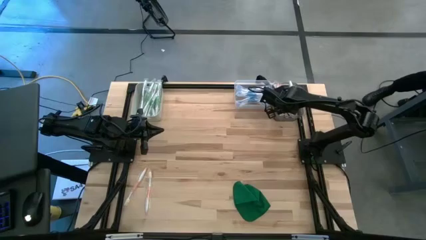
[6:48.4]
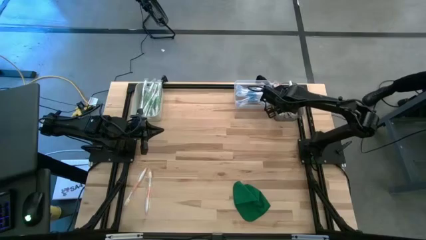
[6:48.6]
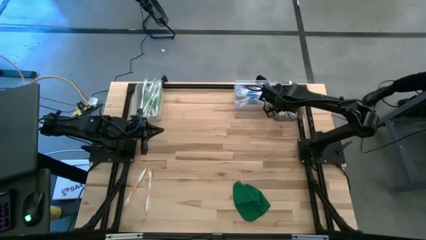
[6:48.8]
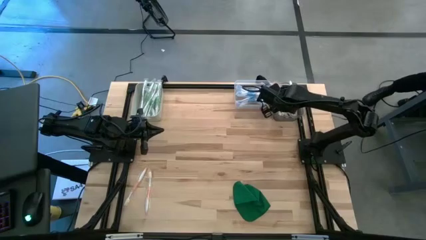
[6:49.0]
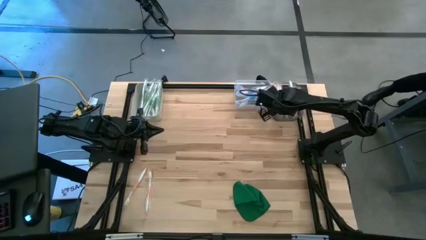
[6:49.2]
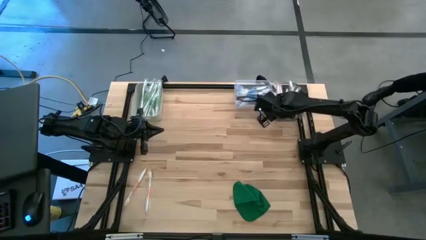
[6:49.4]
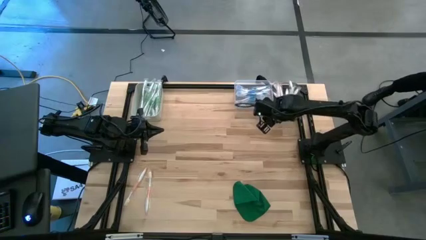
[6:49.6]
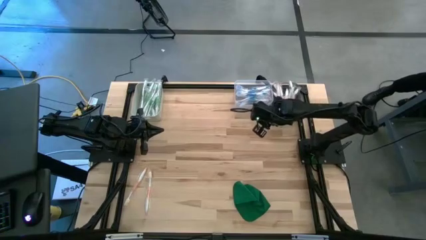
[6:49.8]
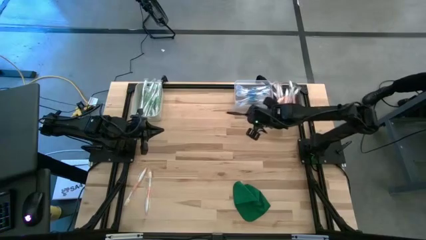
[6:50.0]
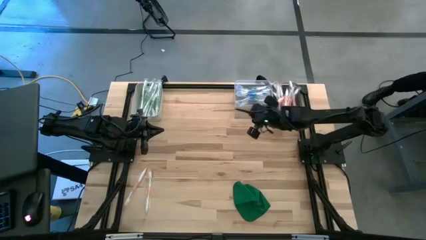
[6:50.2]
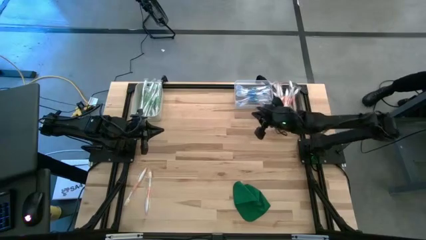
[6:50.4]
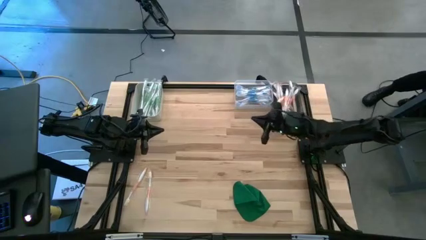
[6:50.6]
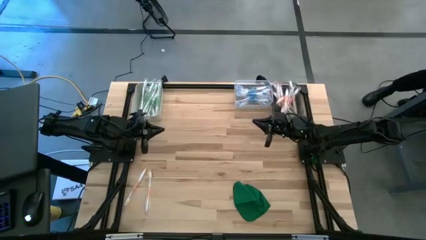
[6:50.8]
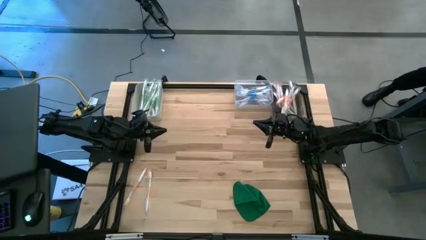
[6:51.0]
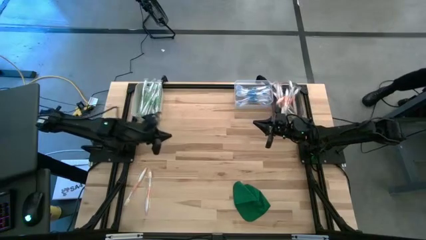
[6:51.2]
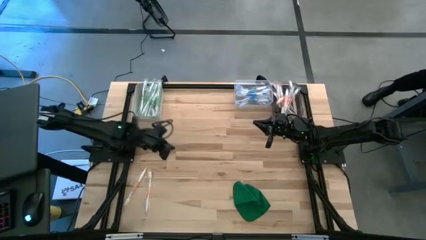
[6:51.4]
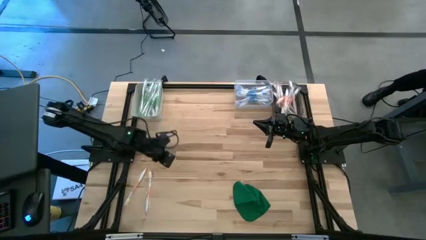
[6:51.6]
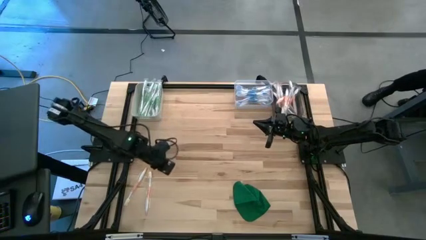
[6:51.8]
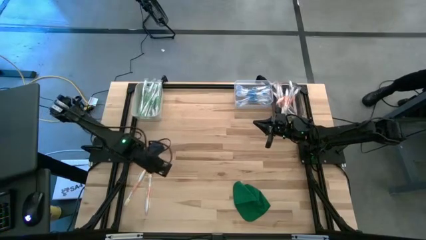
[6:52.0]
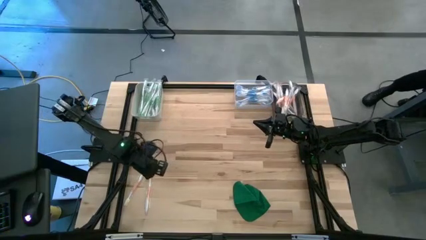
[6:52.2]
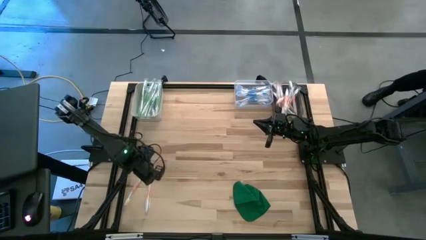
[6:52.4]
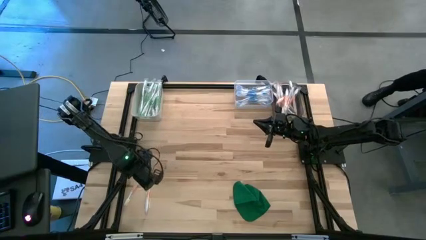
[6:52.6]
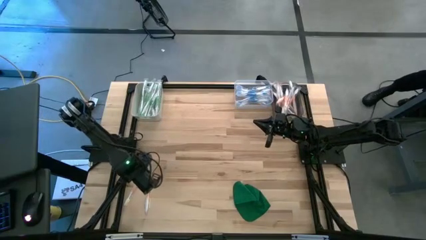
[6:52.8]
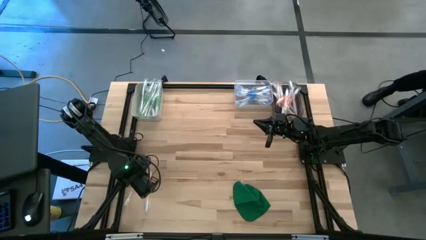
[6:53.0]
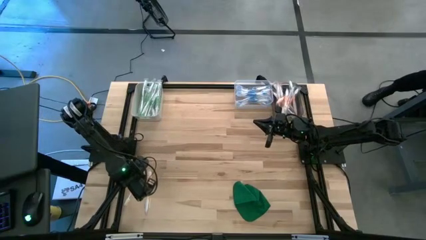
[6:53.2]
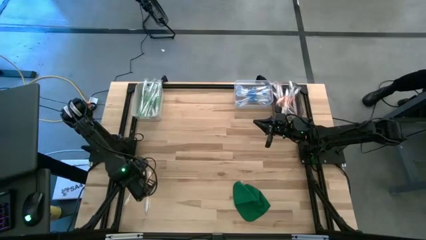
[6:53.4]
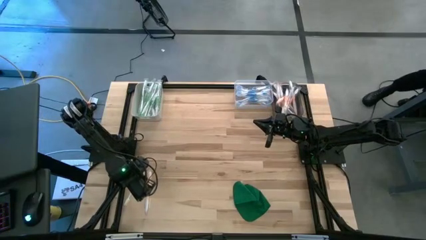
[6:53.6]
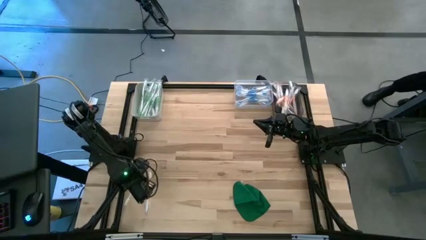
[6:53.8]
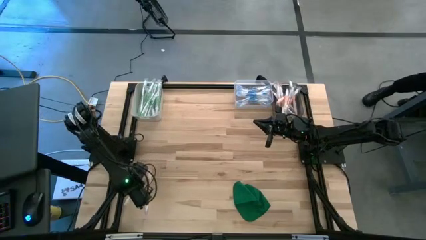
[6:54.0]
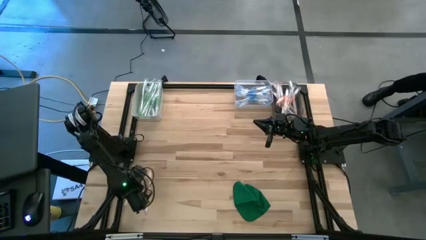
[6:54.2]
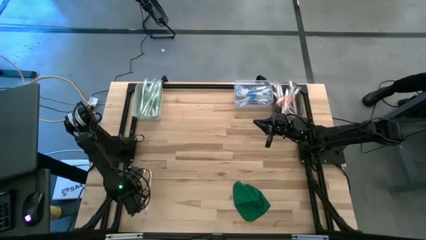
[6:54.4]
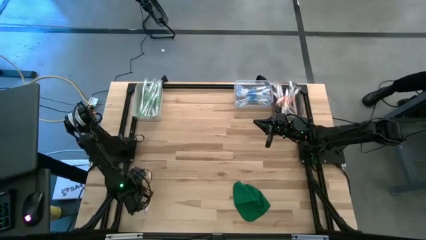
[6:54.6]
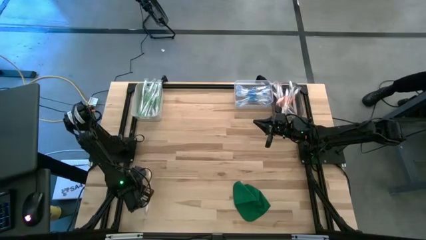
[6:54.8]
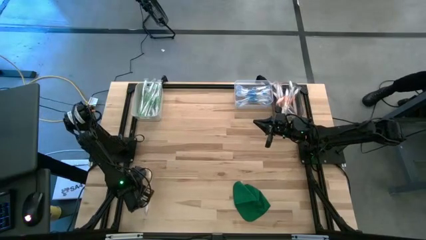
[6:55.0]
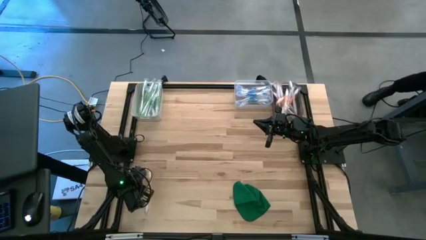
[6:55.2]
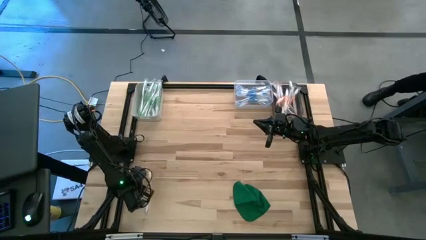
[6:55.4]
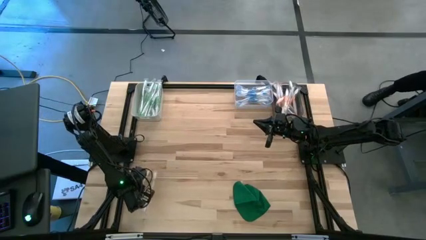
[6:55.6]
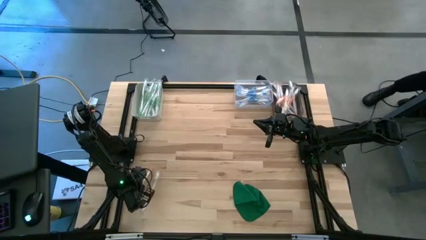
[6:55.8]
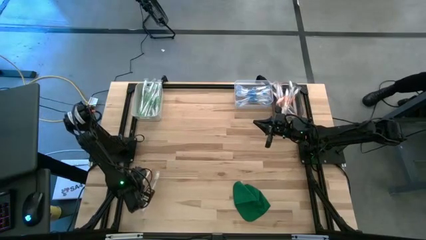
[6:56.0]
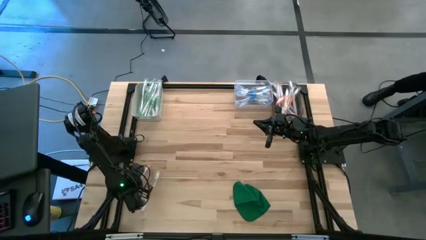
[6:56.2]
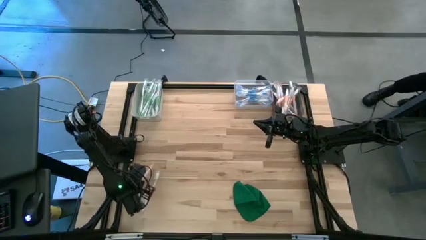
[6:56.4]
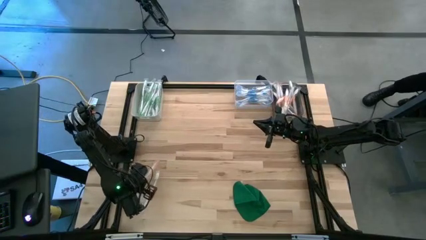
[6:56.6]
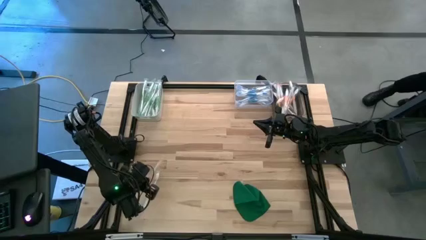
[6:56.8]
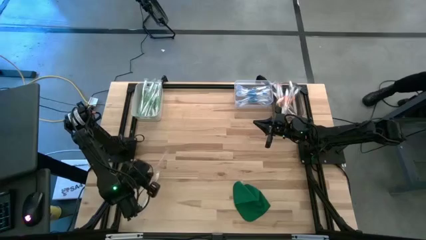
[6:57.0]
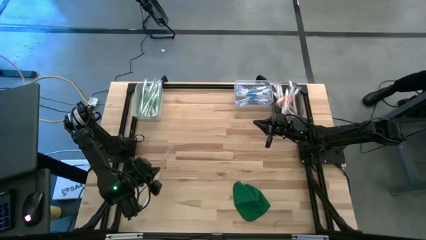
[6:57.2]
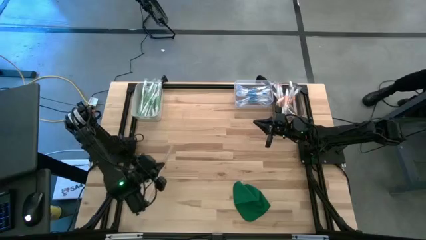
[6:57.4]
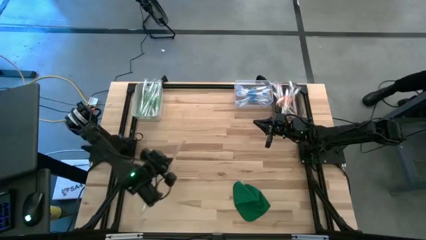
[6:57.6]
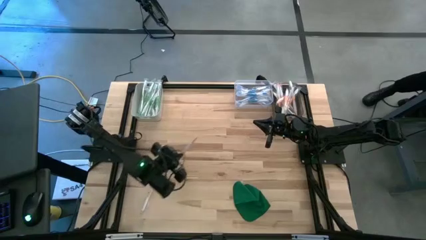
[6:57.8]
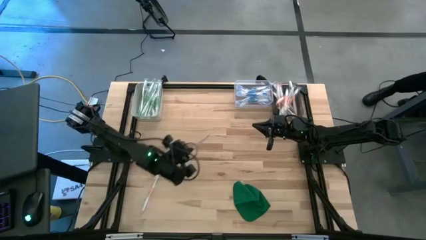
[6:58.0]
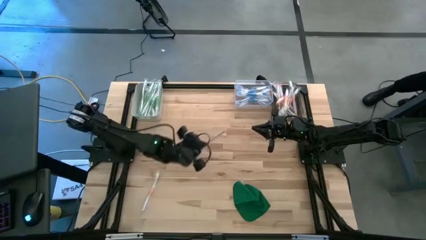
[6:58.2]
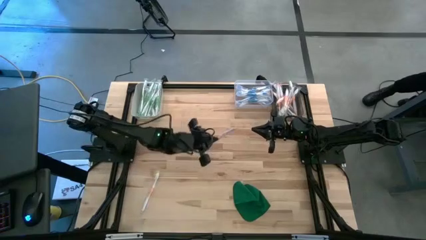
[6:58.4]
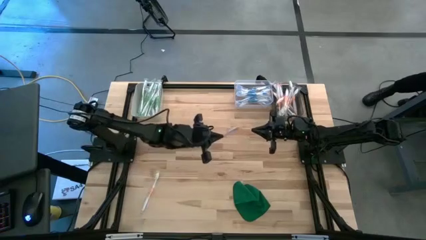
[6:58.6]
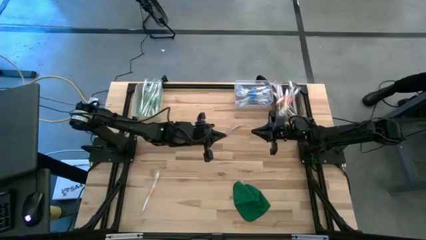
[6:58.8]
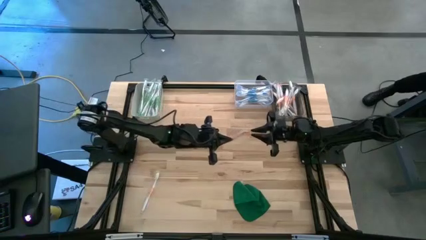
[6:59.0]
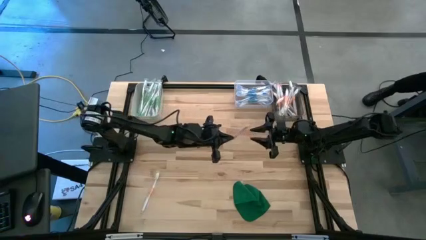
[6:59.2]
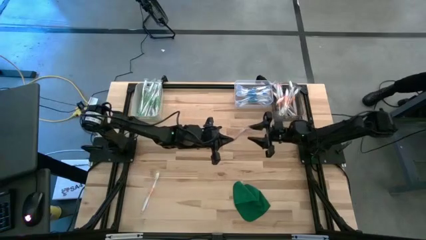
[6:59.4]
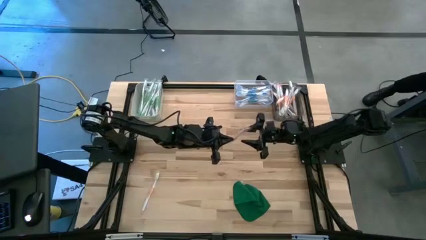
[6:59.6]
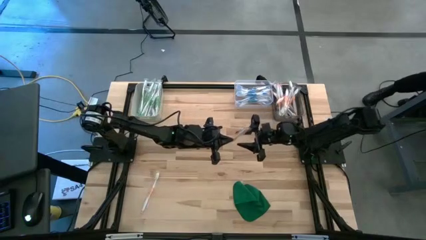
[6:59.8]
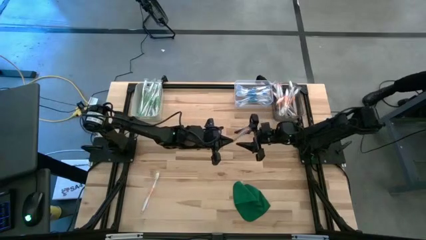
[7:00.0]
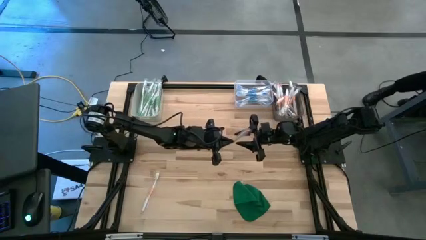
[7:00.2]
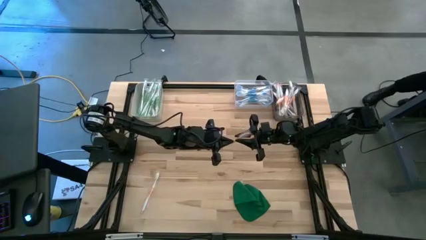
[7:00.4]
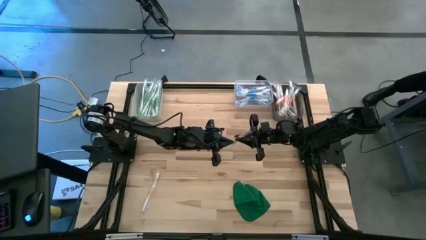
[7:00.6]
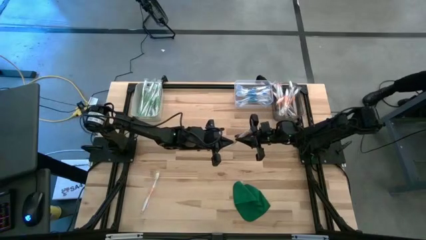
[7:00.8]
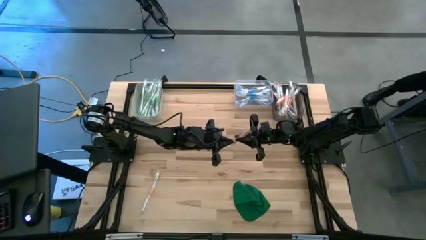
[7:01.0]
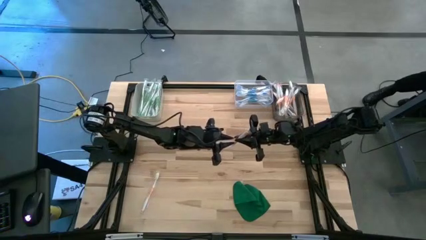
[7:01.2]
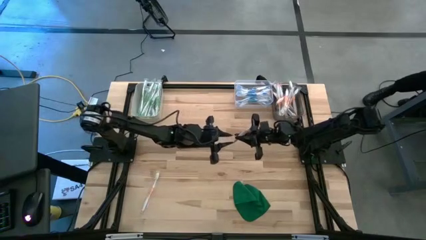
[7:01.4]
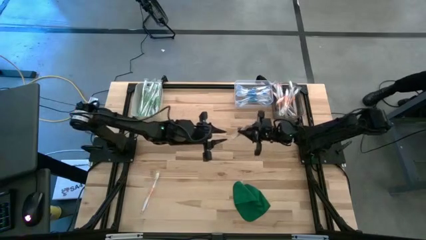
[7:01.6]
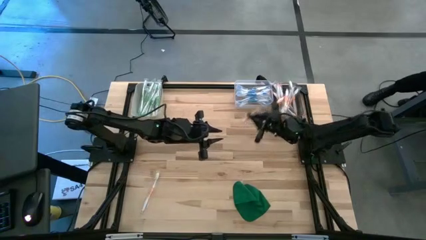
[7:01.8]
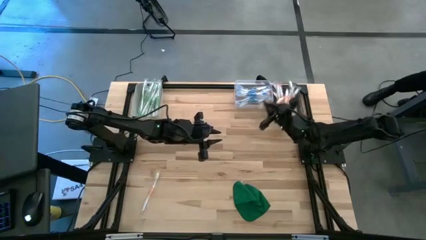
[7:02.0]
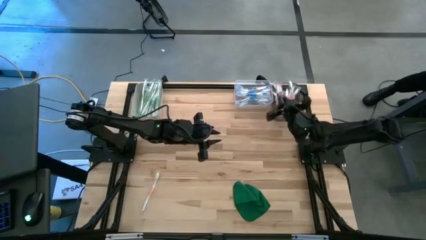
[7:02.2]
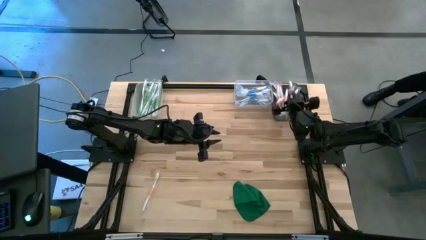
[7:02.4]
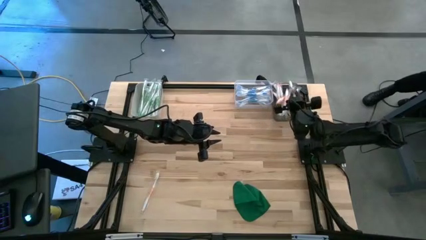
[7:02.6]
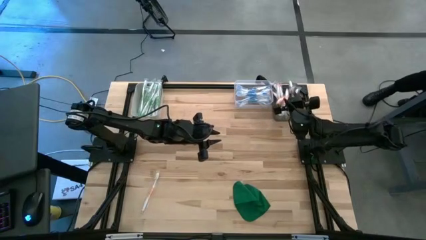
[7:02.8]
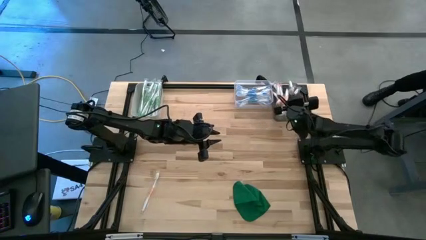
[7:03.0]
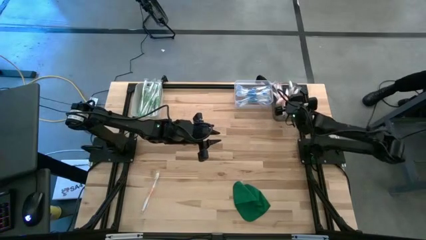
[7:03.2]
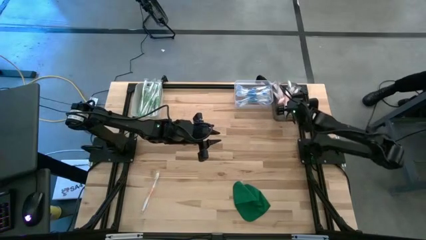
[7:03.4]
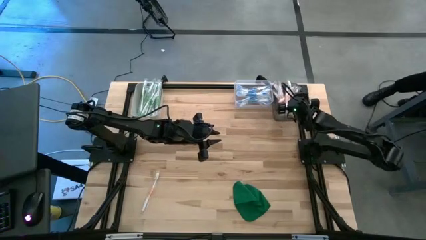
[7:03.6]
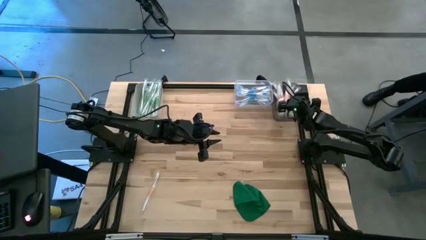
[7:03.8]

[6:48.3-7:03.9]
Task: Pick & Place Toothbrushes
Put the orange toothbrush into the black bin
